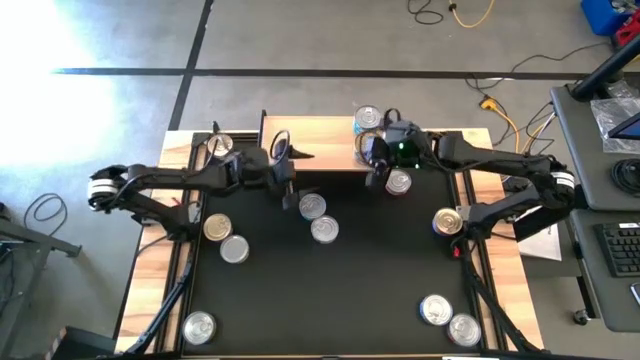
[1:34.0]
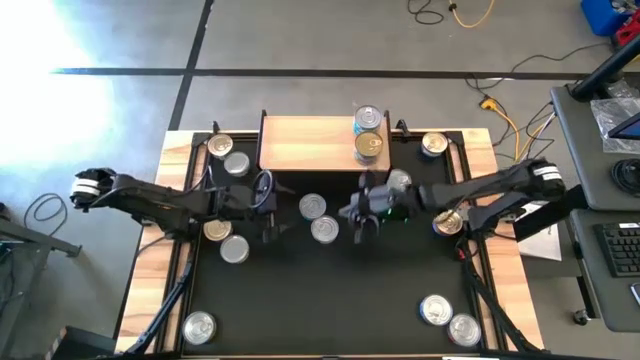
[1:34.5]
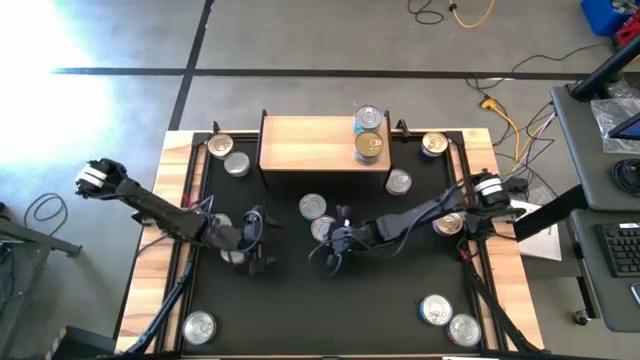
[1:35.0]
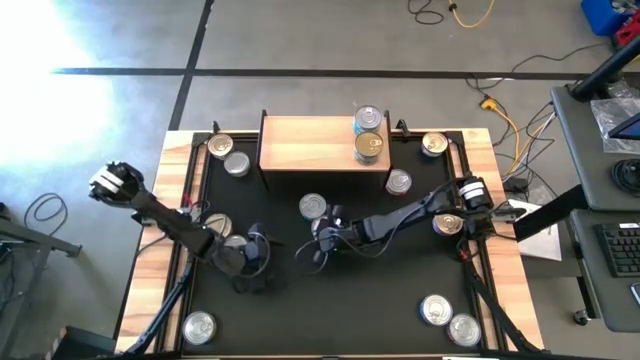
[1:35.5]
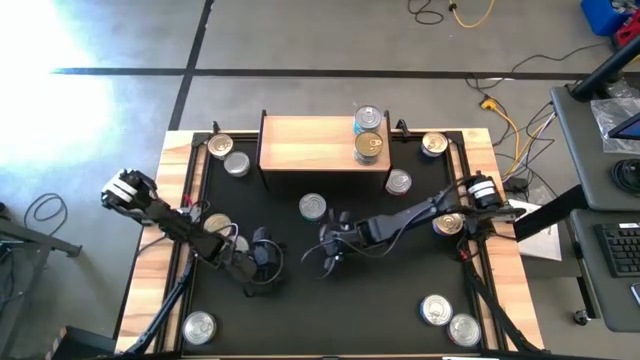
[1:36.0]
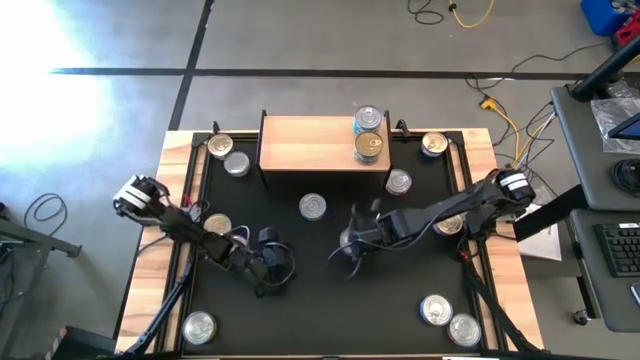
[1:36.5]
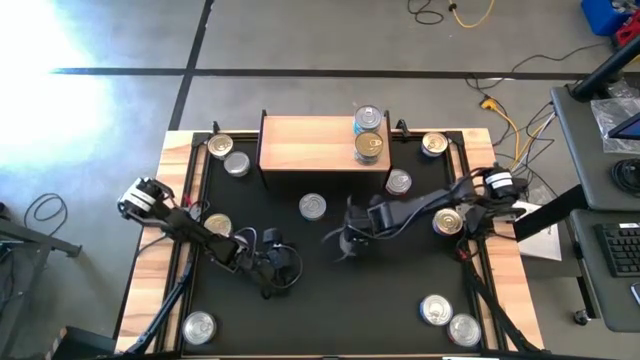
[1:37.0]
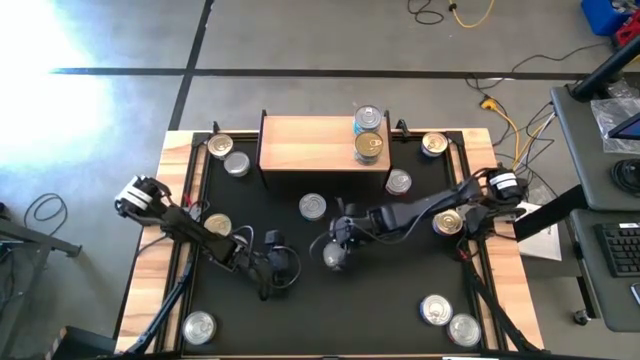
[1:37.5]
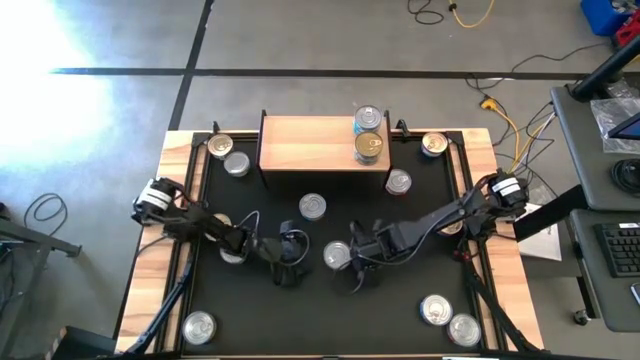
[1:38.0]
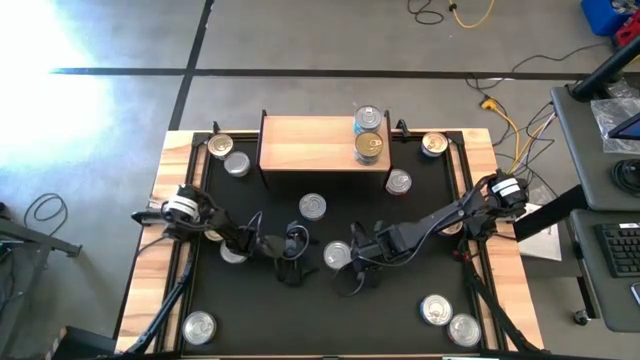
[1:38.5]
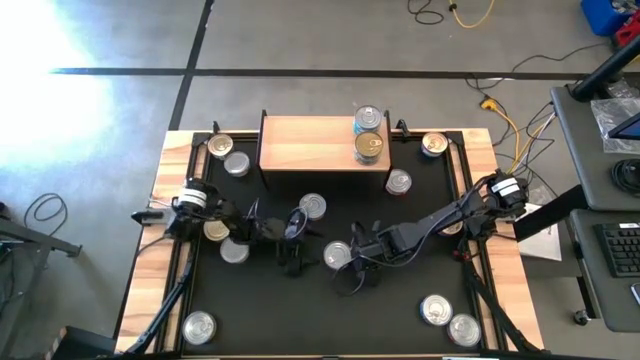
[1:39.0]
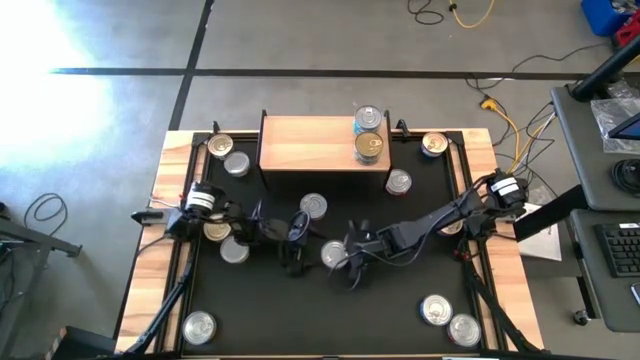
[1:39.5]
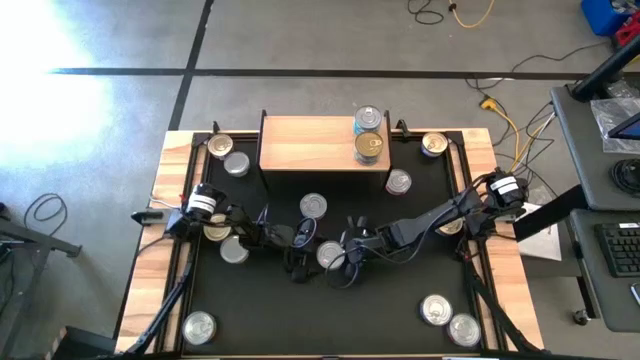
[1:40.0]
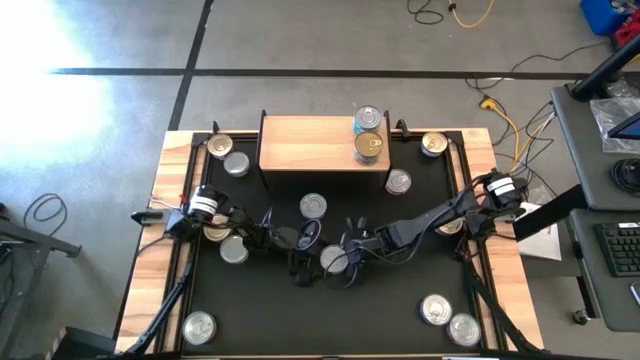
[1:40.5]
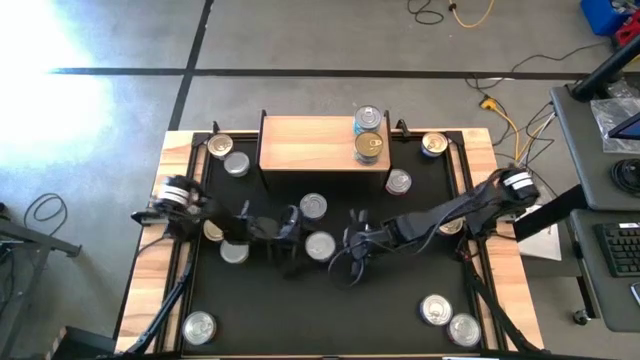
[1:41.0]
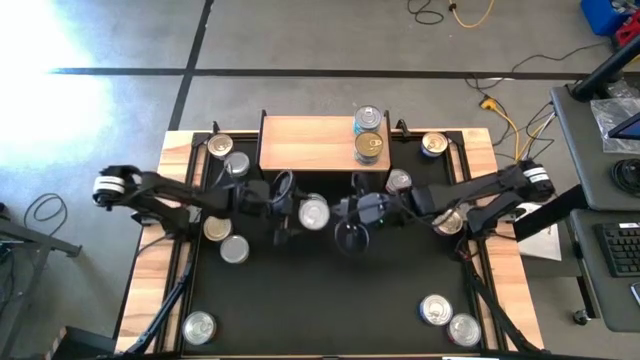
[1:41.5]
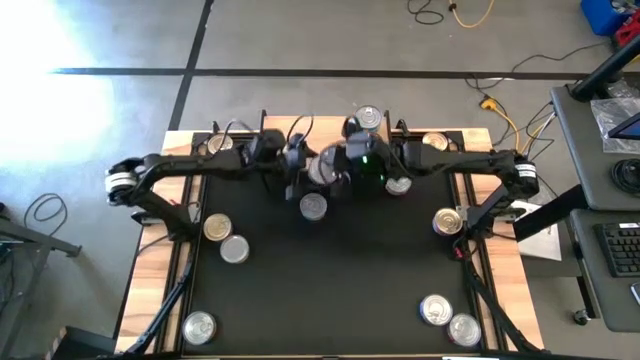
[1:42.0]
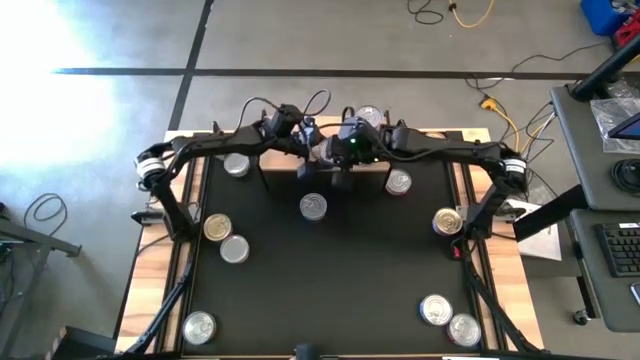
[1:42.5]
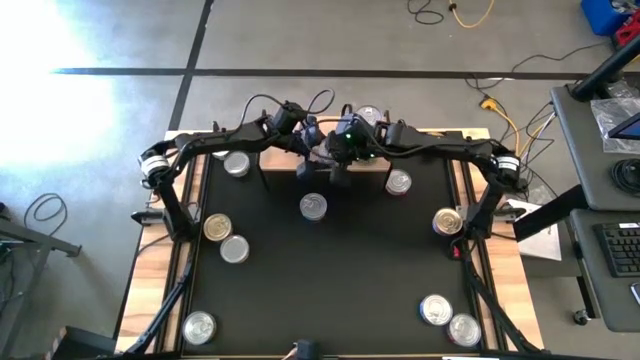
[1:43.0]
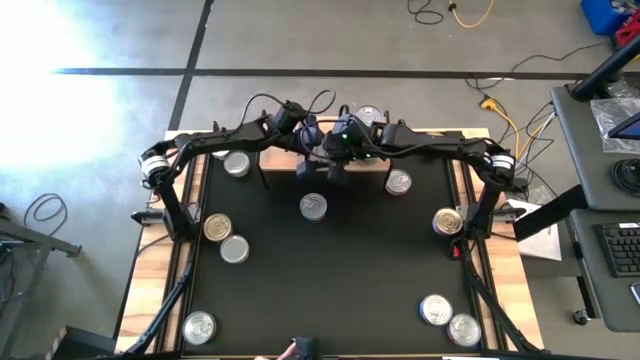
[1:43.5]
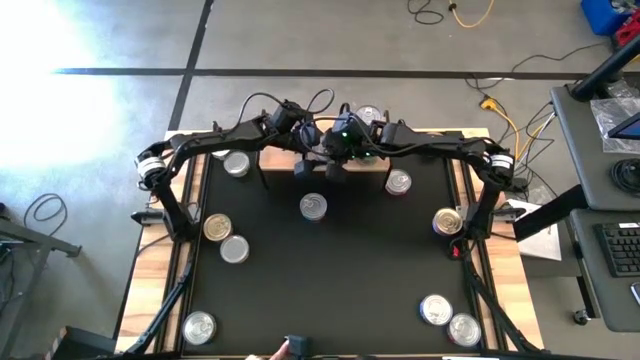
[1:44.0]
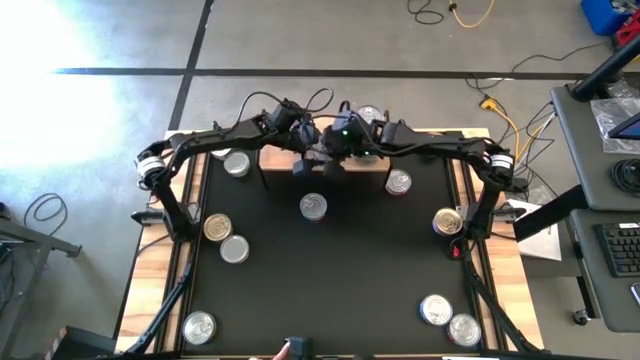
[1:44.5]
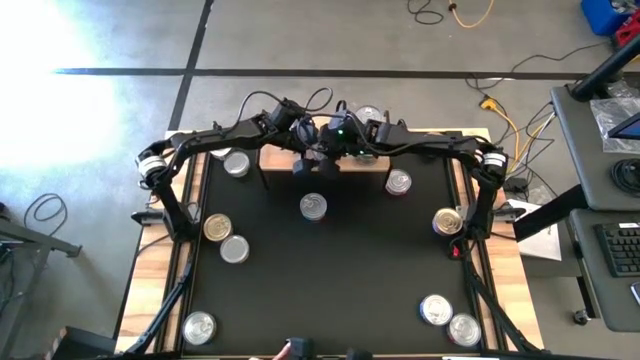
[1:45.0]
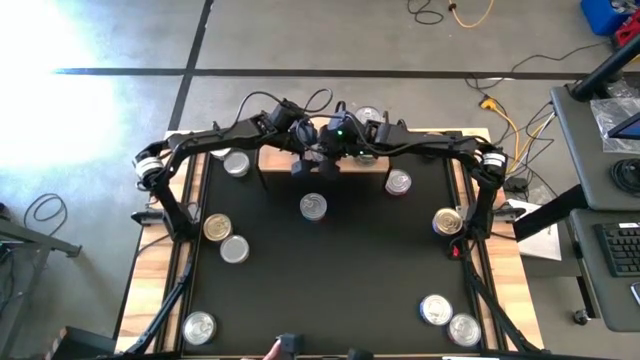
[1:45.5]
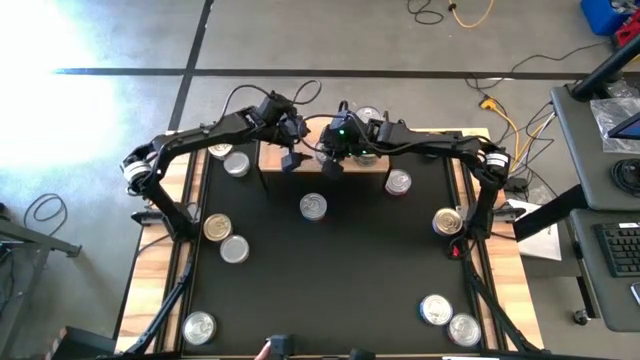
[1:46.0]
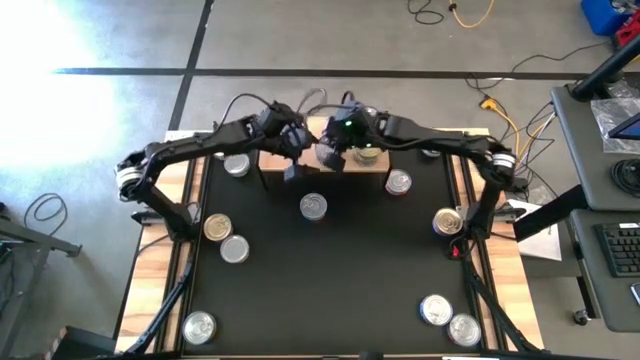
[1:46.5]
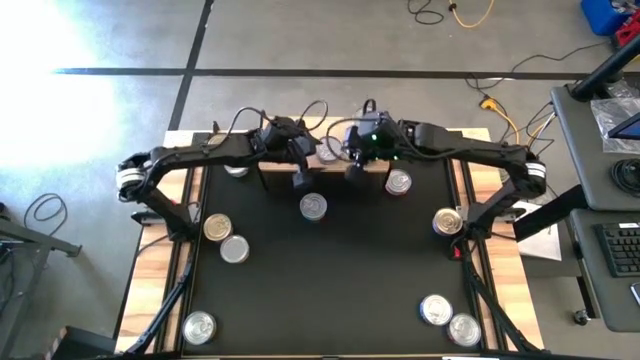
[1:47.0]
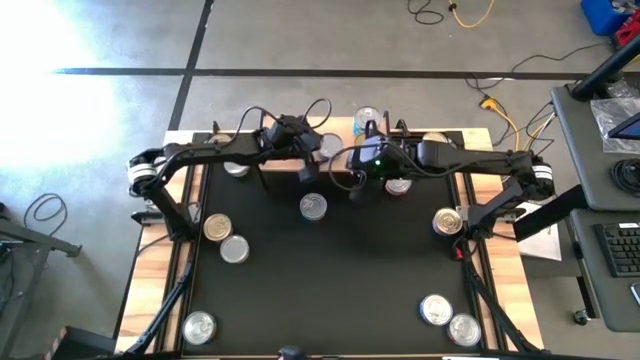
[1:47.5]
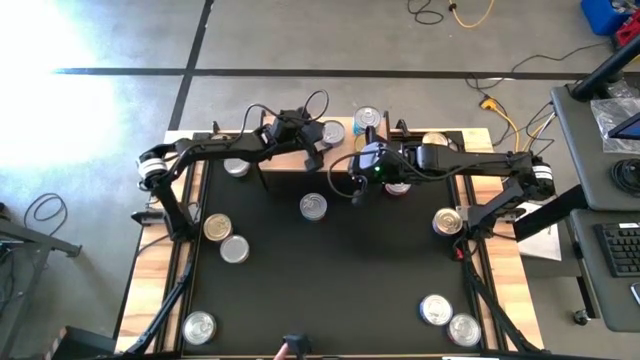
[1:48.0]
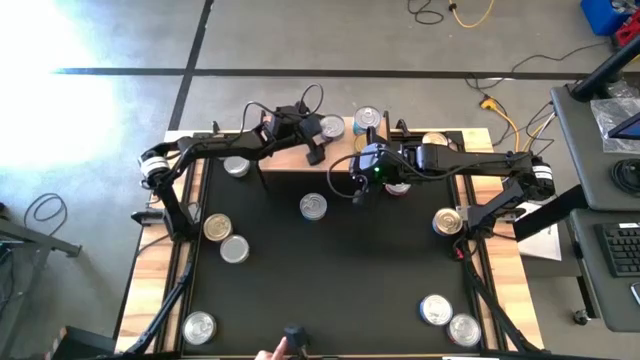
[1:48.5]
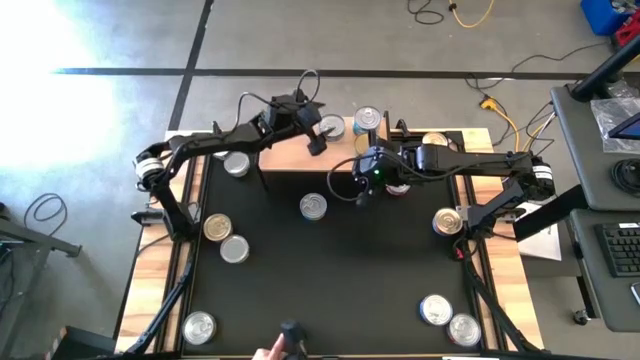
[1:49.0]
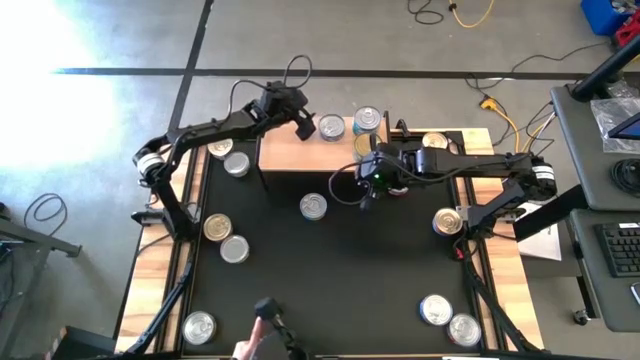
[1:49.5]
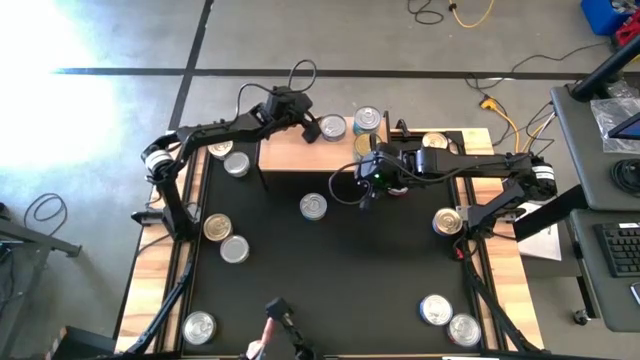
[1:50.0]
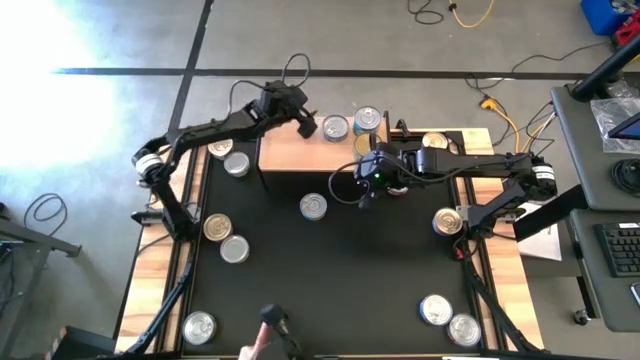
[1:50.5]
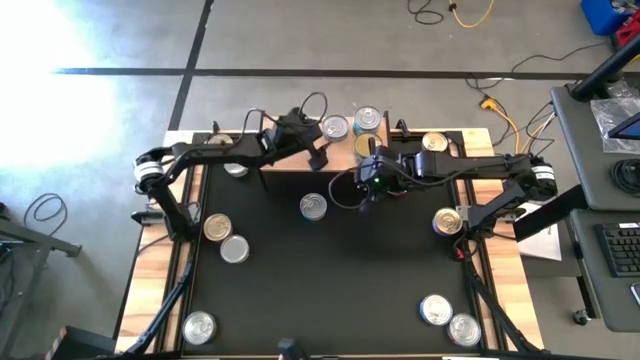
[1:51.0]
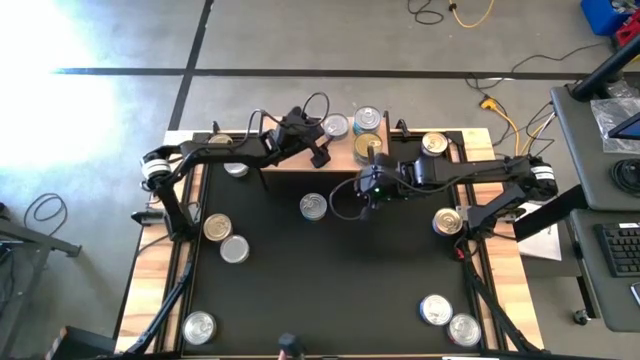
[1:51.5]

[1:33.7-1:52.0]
Task: Stack canned seafood by type on shelf
Put the top dark blue tuna can on the shelf

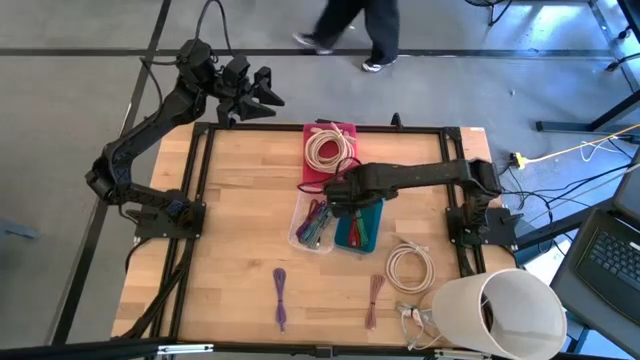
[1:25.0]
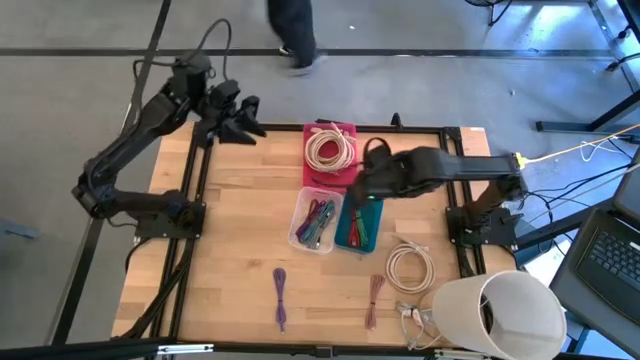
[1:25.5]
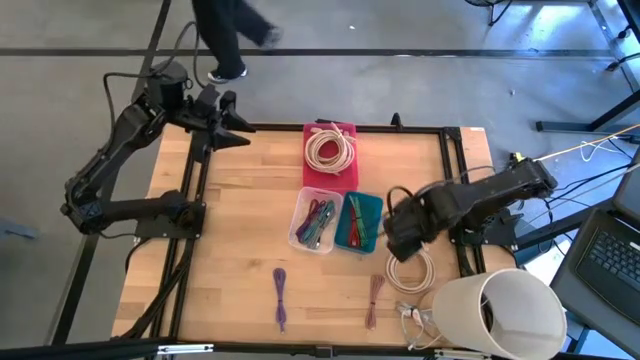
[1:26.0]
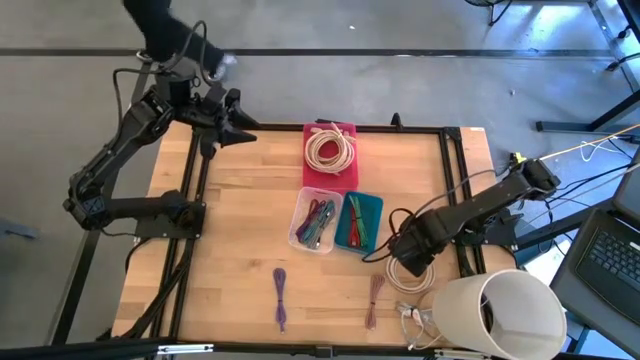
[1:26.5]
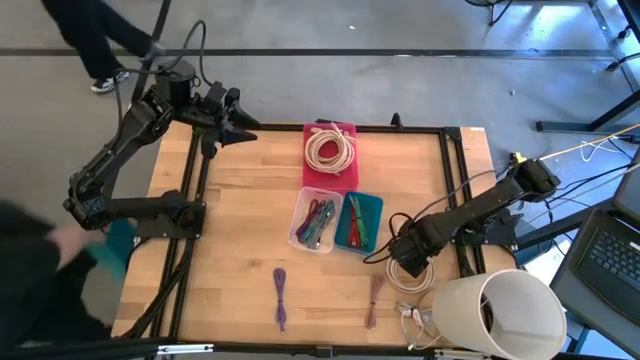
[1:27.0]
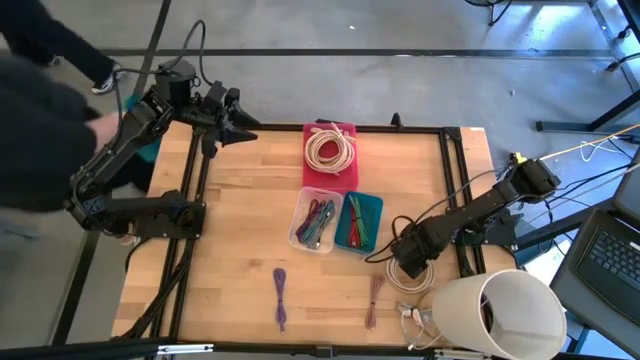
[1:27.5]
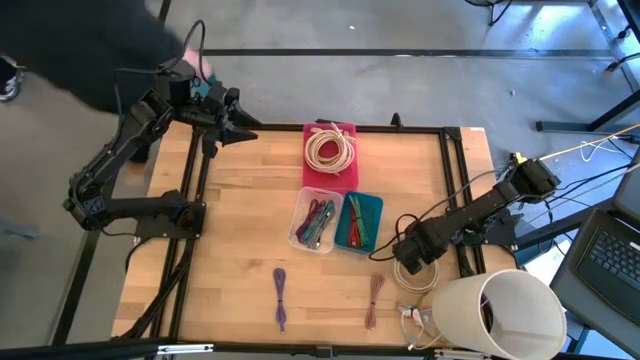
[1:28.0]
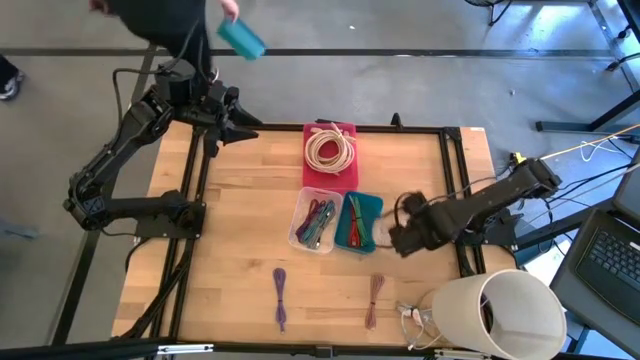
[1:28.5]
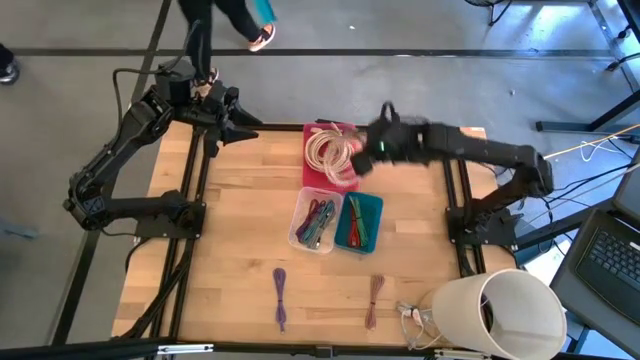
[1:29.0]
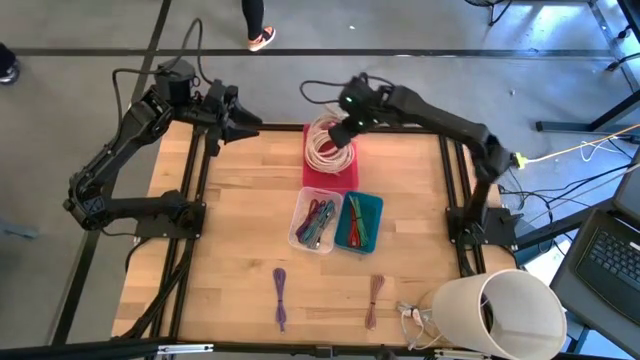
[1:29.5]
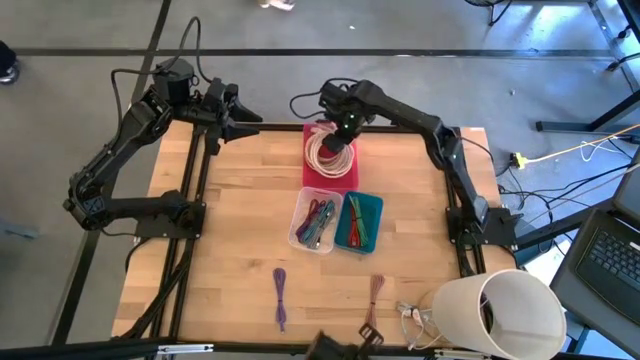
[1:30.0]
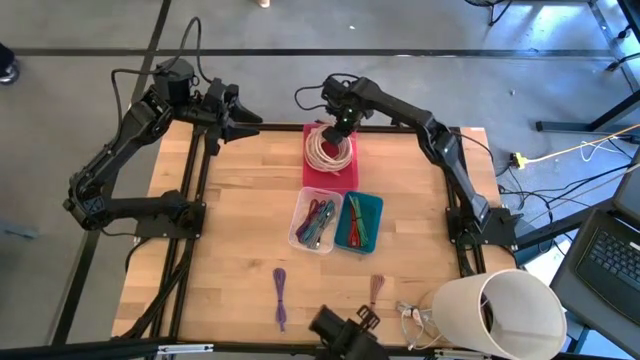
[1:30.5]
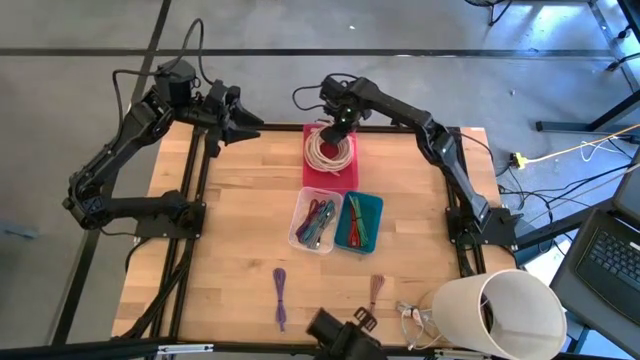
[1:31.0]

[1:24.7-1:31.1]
Task: Pick & Place USB Port
Put the brown HDMI cable into the pink bin
